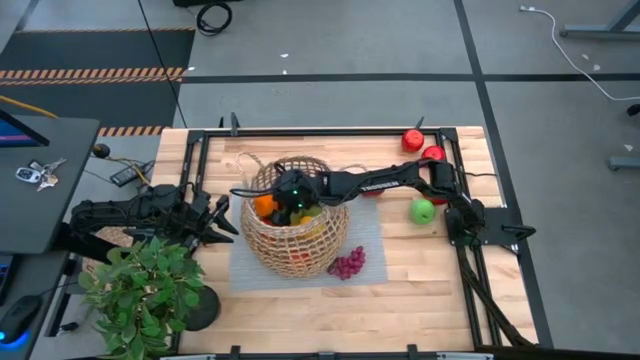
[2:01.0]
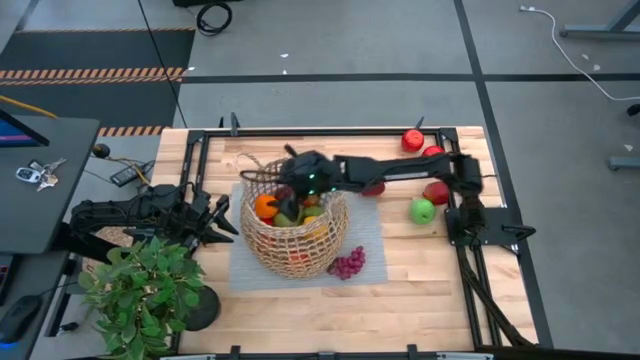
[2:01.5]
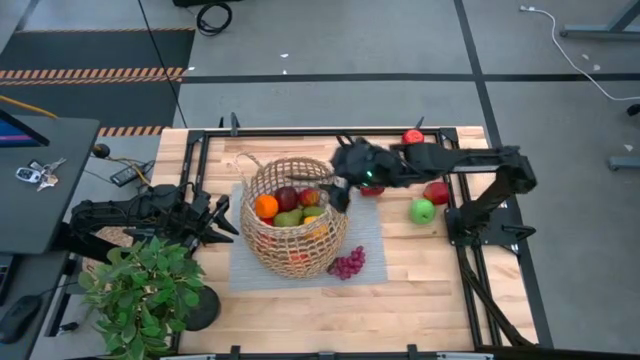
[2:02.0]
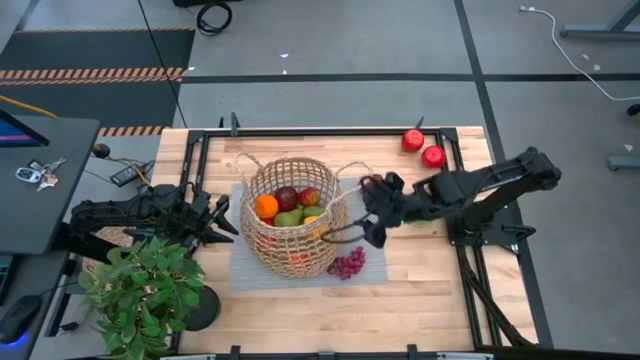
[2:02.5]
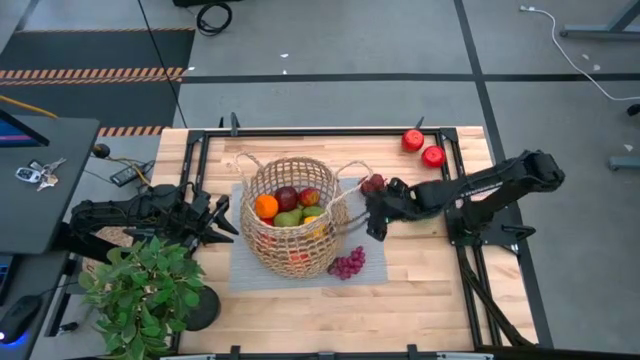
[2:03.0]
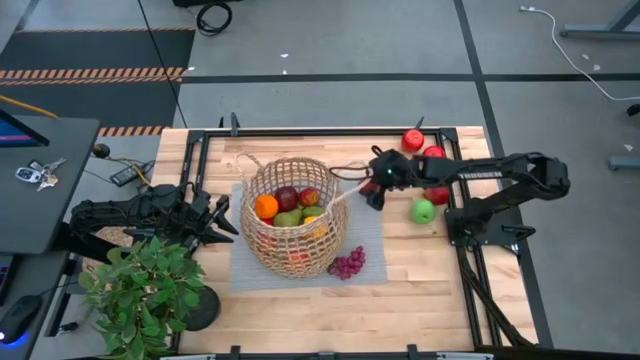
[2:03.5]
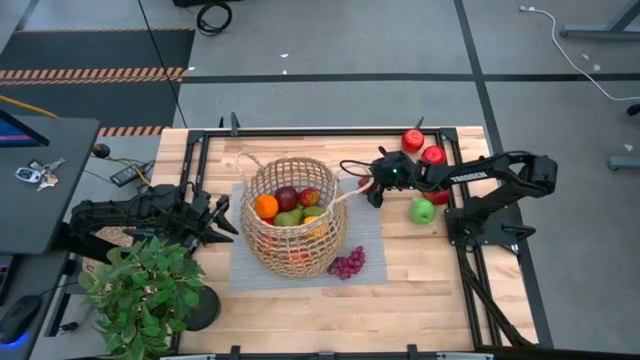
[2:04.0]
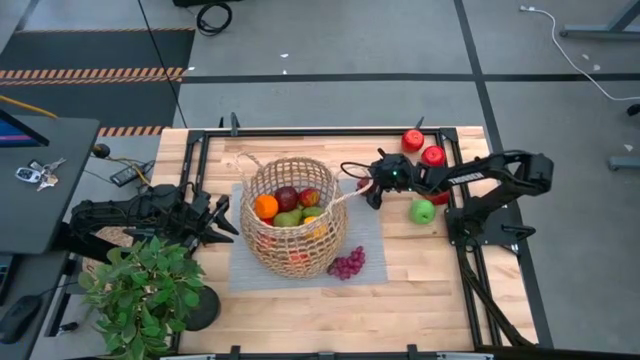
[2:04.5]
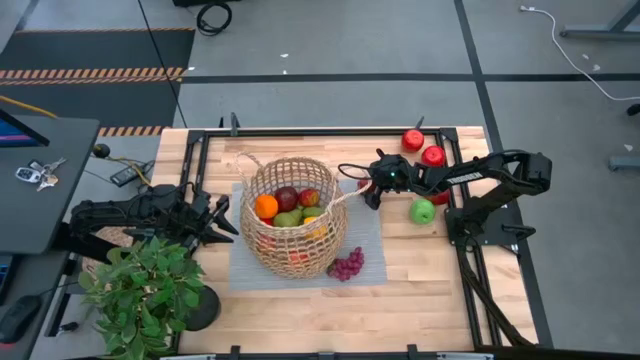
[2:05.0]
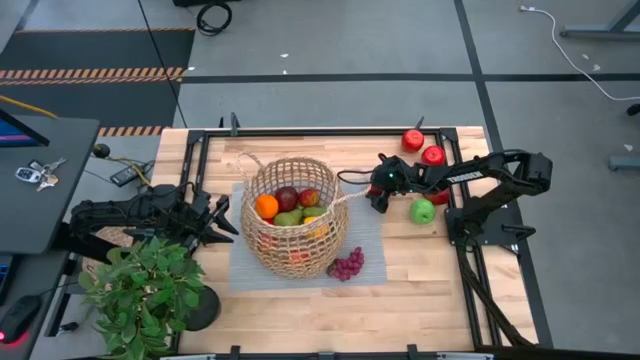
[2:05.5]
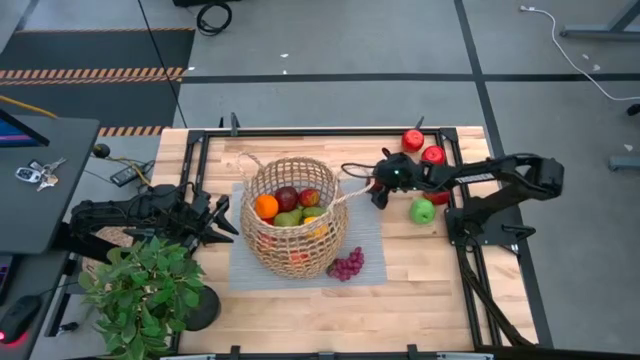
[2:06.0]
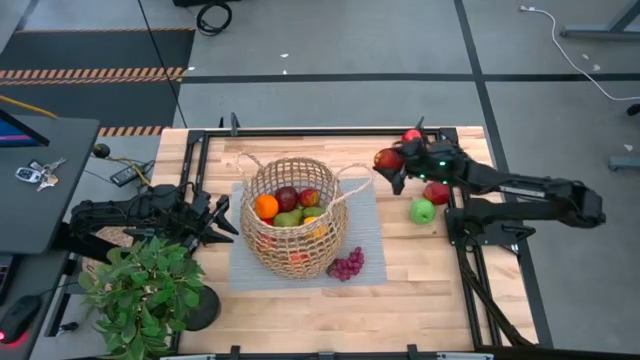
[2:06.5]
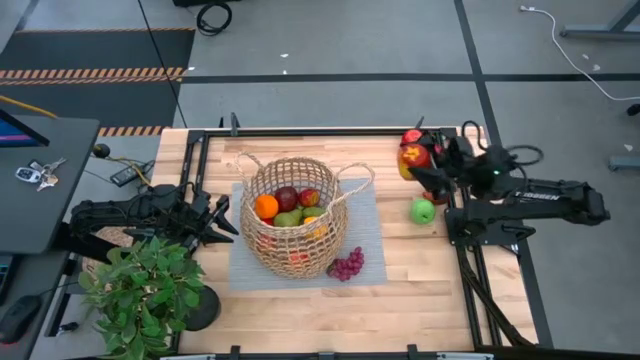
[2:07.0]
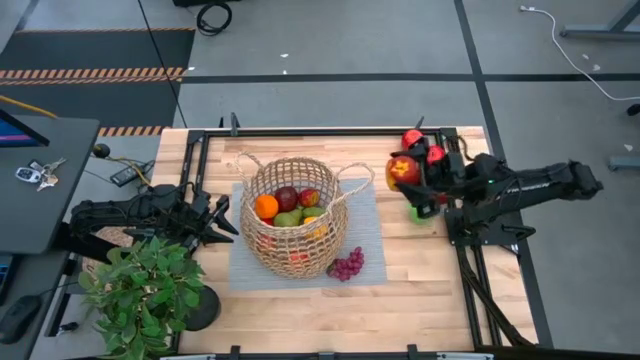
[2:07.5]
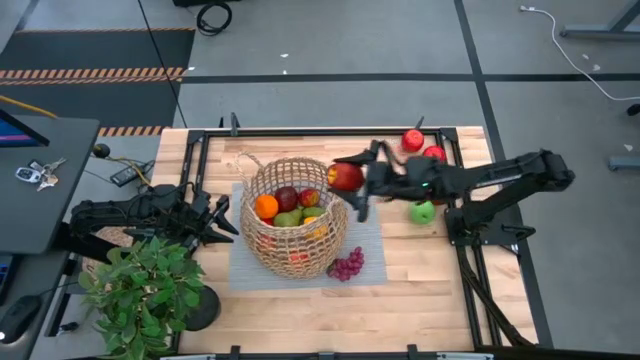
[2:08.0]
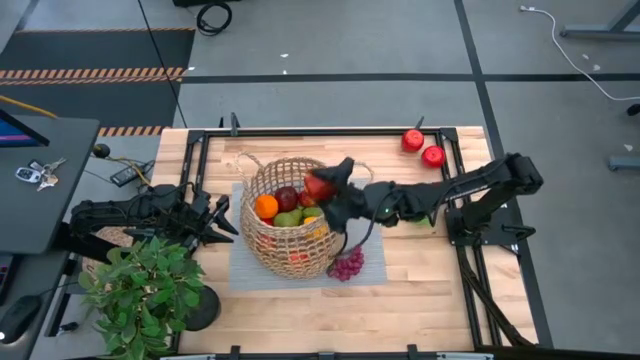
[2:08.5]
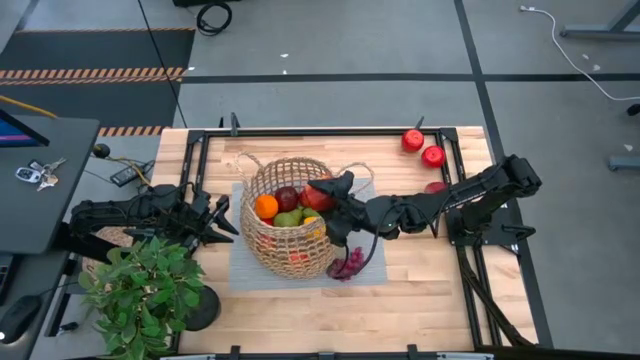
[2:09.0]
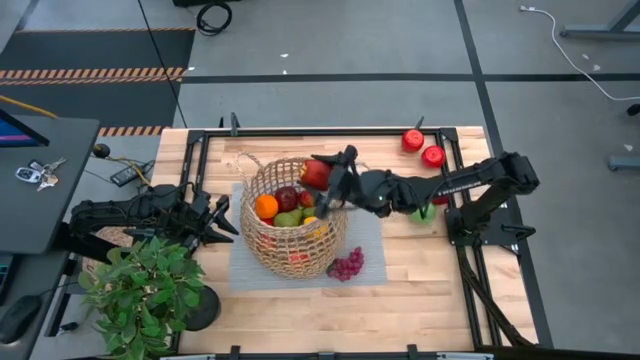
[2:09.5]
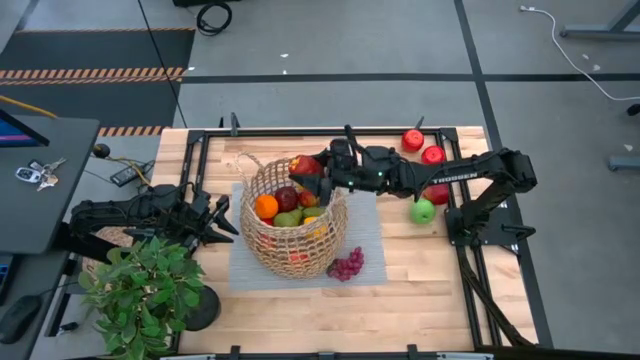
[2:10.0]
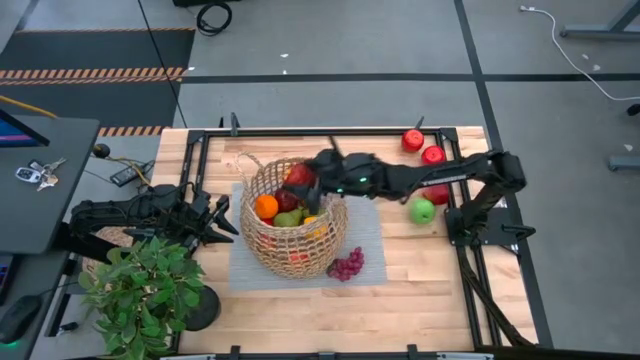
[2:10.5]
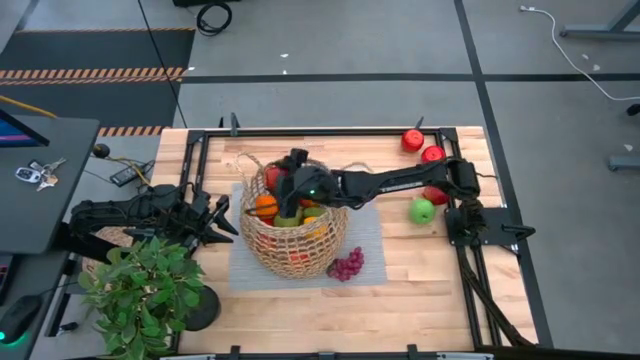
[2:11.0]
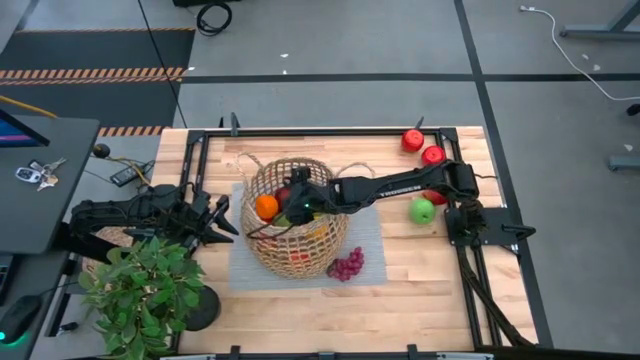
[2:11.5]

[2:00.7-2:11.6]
Task: Build produce basket
Put the bottom red apple into the brown basket

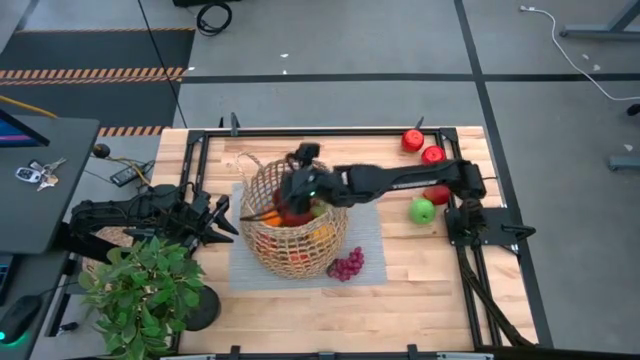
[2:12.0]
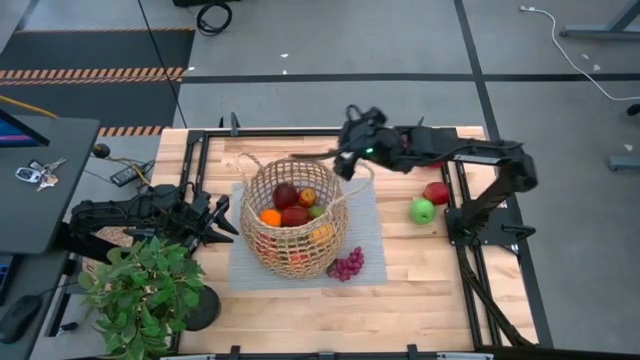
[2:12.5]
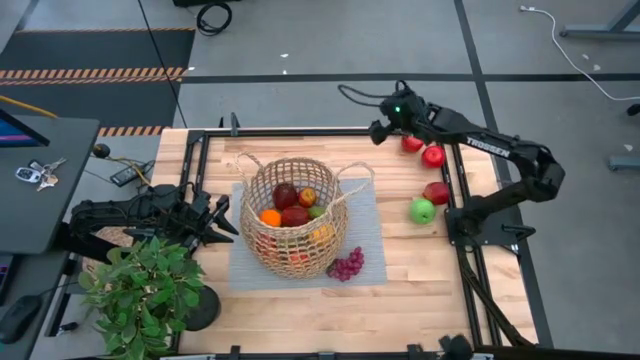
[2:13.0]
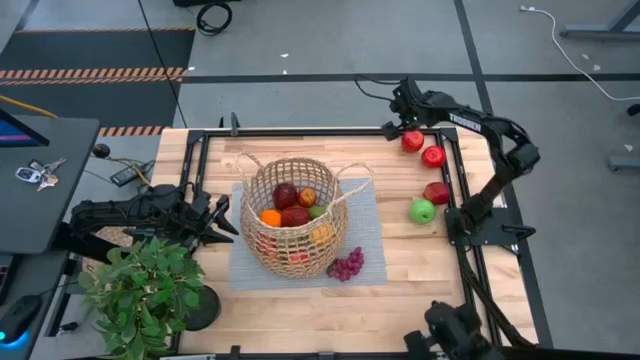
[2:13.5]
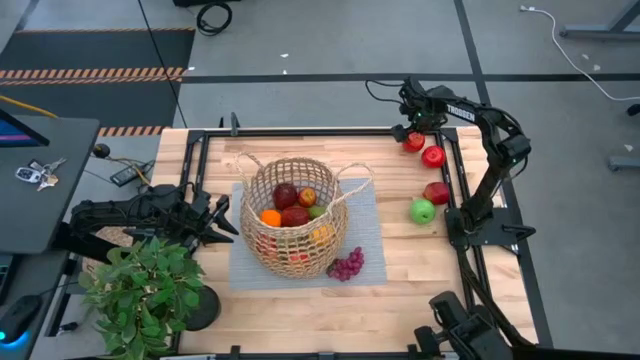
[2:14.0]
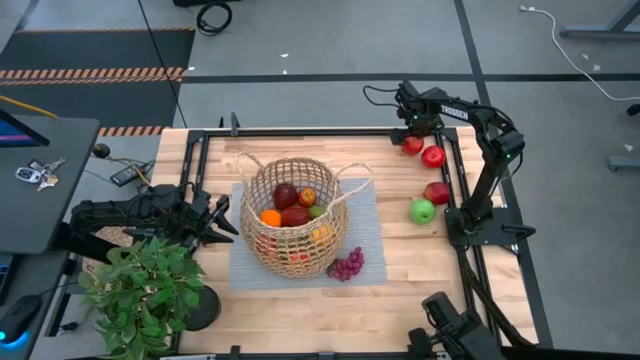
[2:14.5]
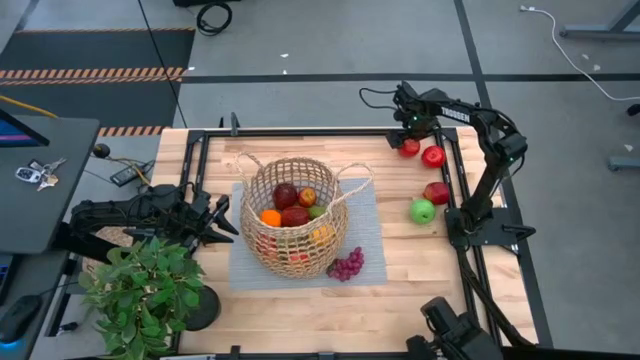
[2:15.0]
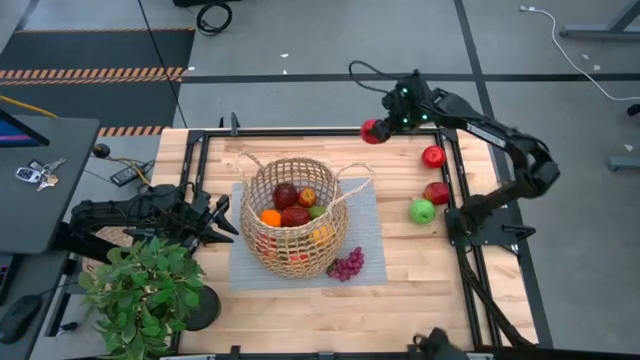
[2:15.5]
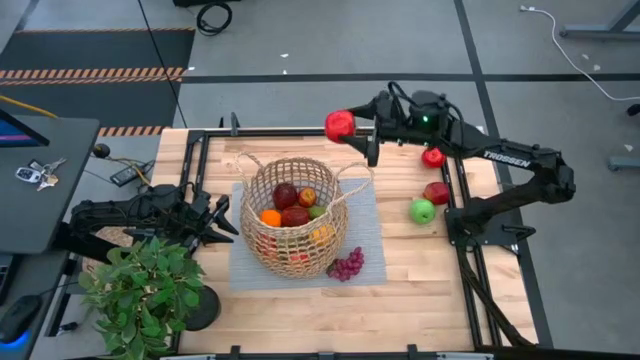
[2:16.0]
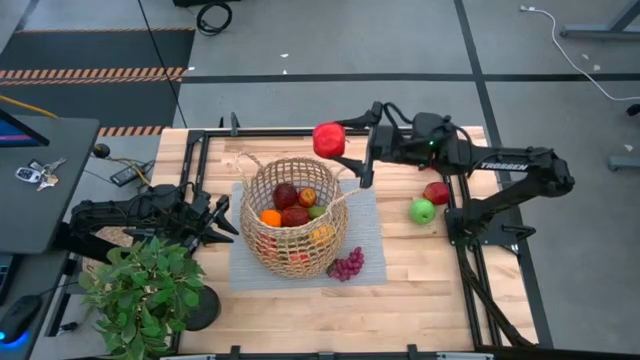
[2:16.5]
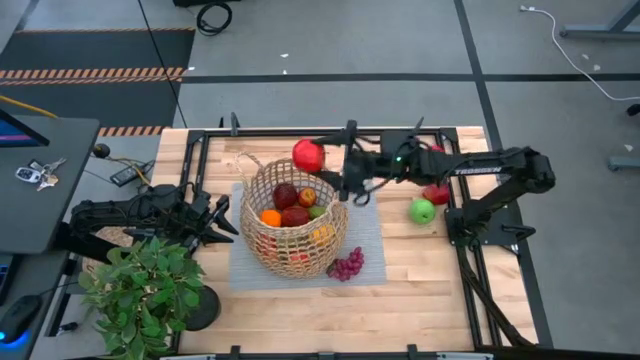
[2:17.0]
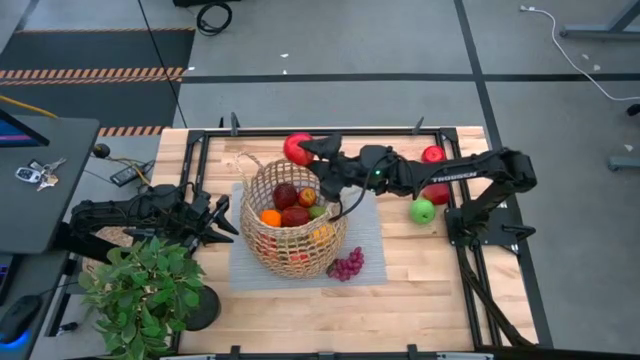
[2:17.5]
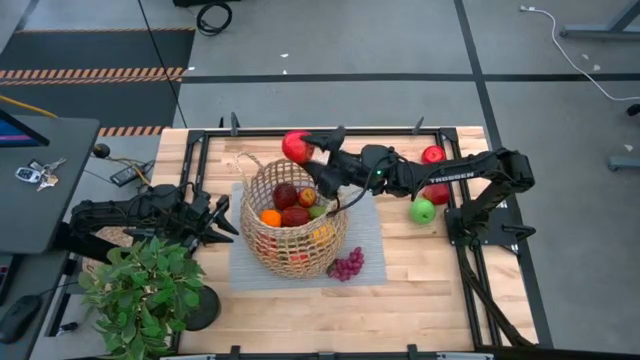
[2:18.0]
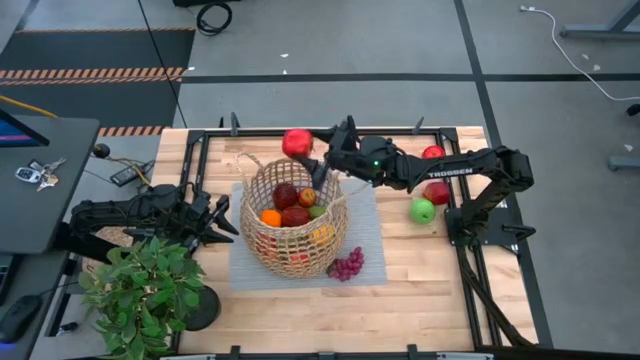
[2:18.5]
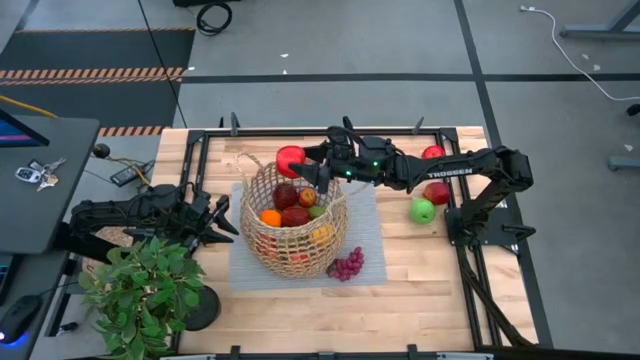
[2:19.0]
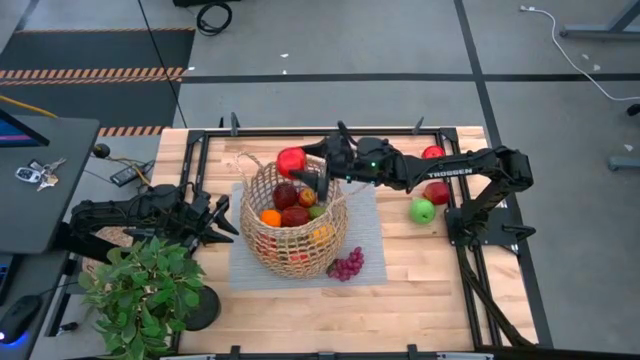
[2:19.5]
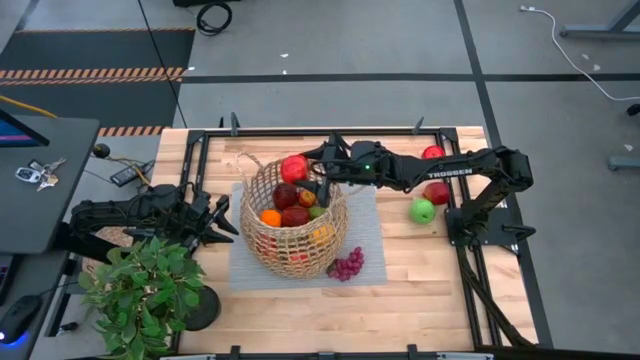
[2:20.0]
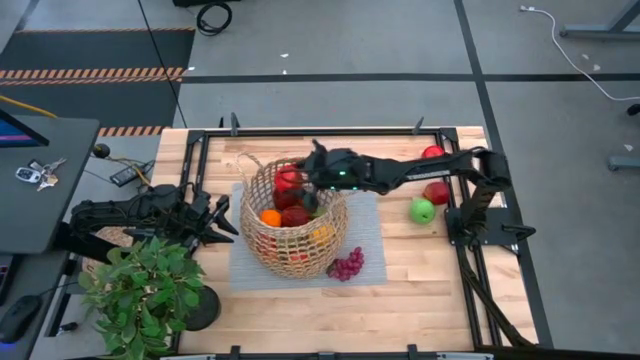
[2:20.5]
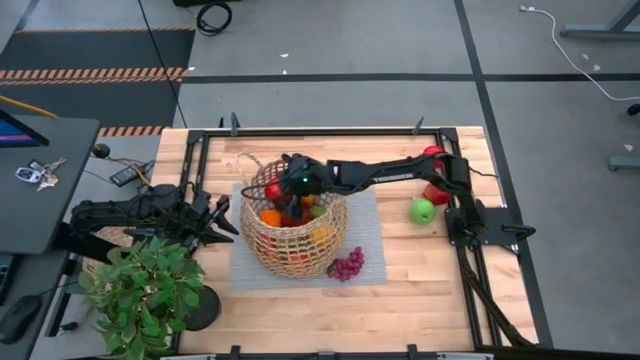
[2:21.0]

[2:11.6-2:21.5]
Put the top red apple into the brown basket

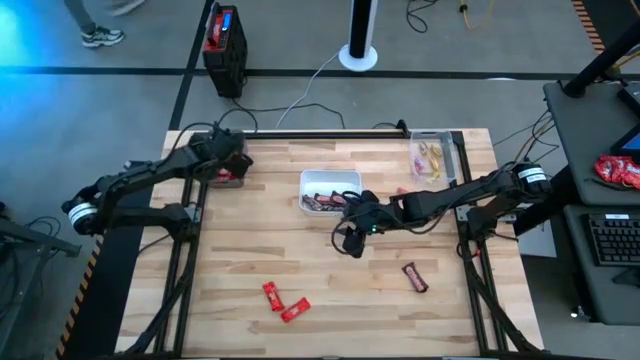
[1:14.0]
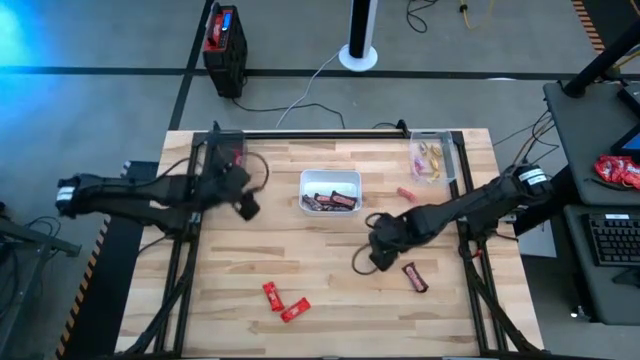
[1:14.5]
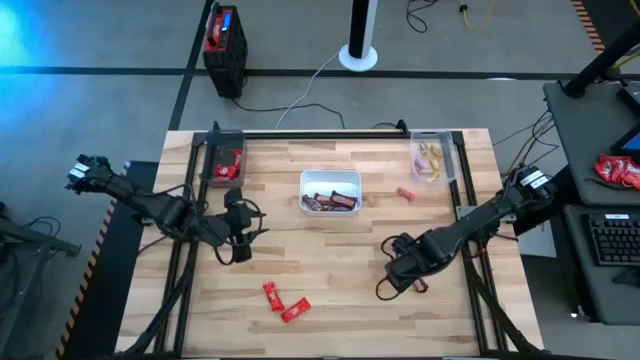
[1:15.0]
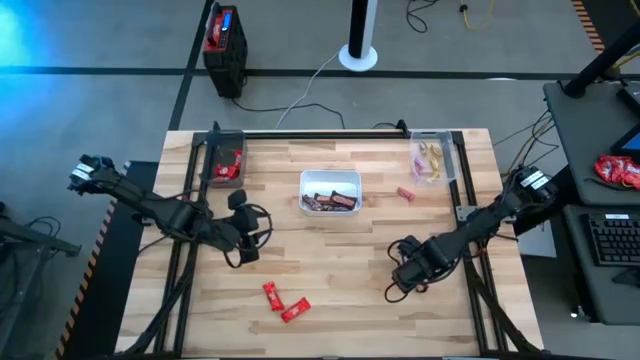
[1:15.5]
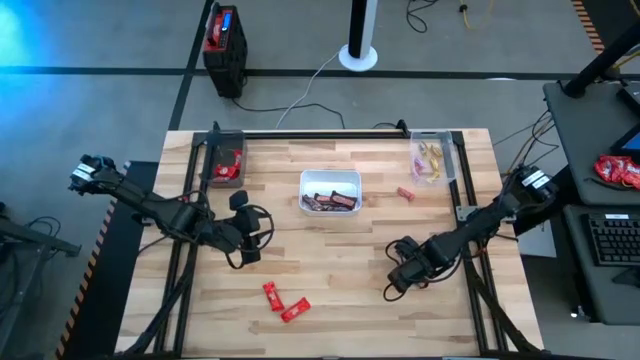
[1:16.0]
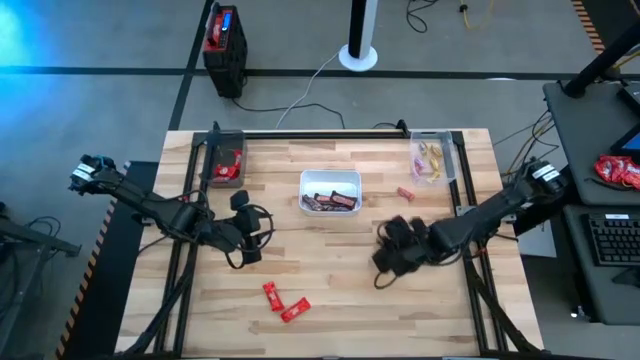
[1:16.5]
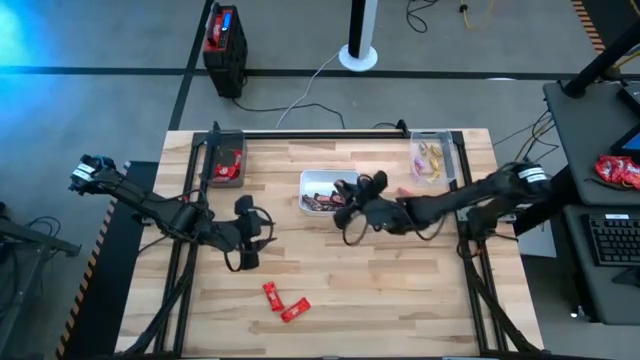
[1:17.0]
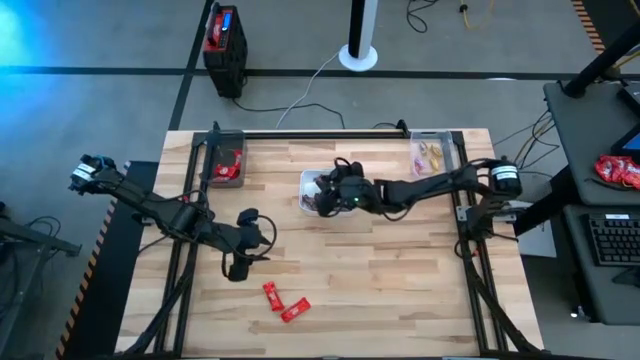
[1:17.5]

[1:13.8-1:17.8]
Task: Sort candy by brand, put in halloween buckets
Put the brown chocolate bar into the white bin
